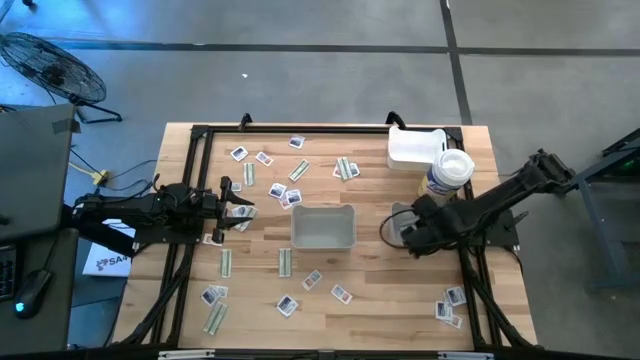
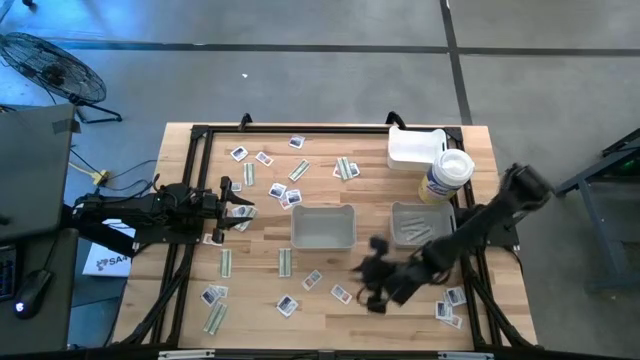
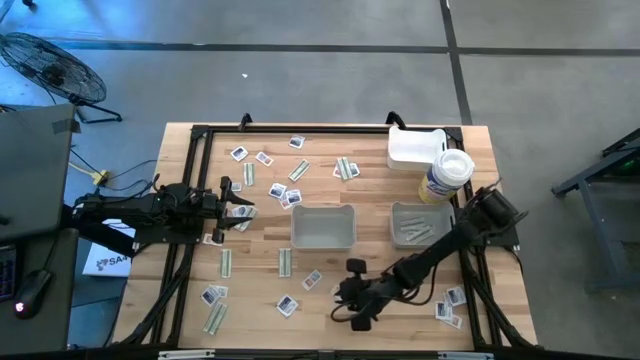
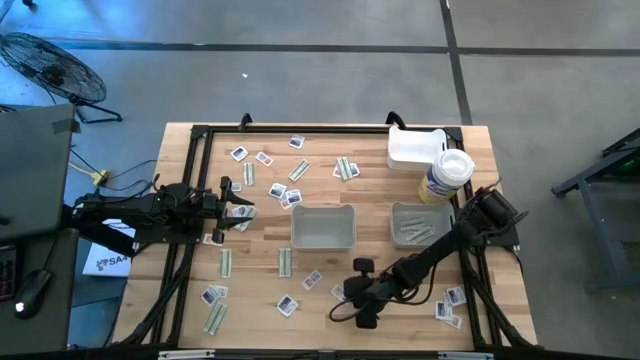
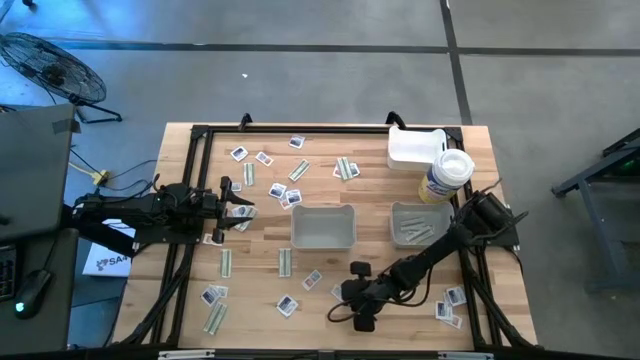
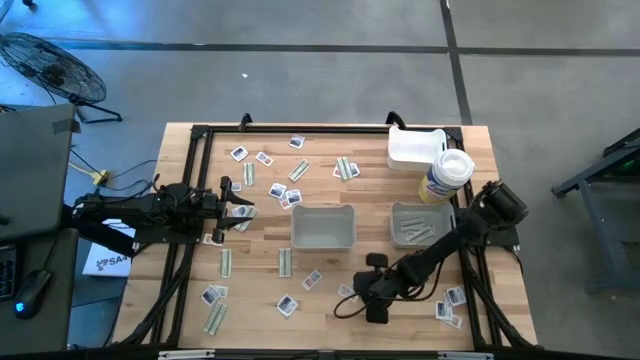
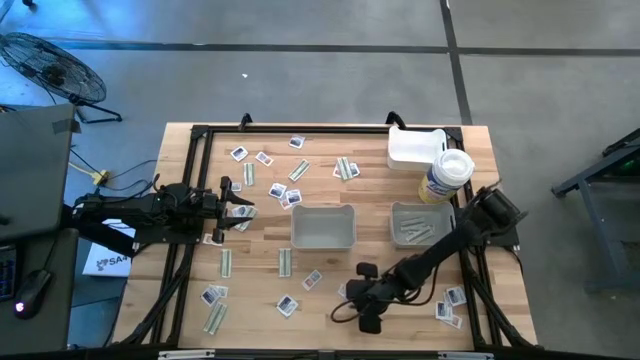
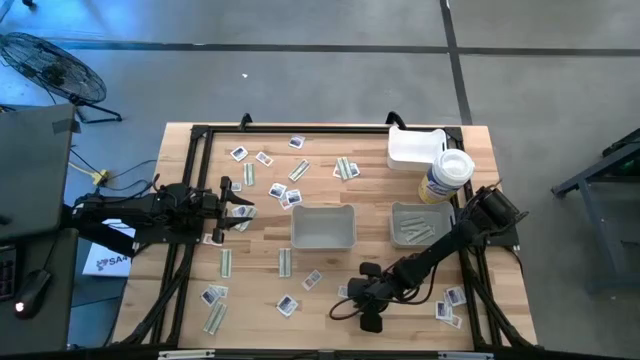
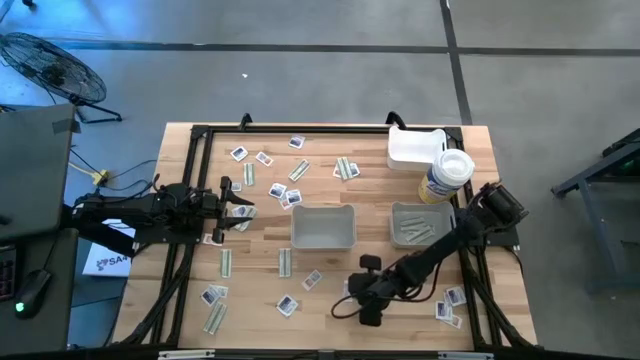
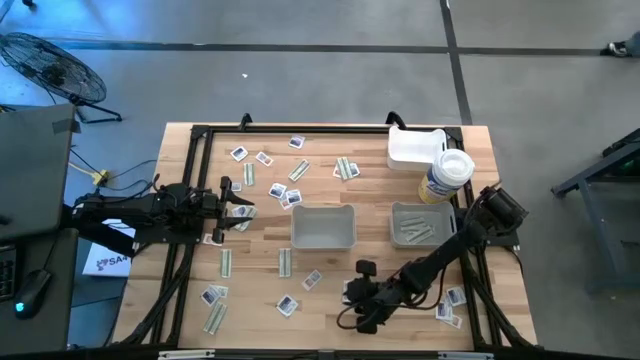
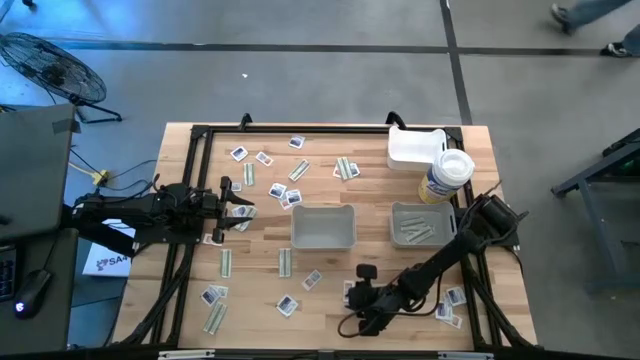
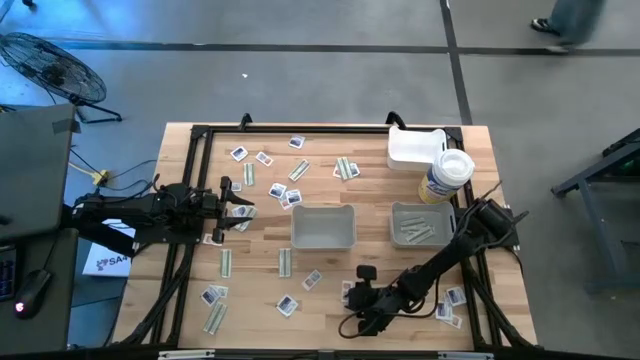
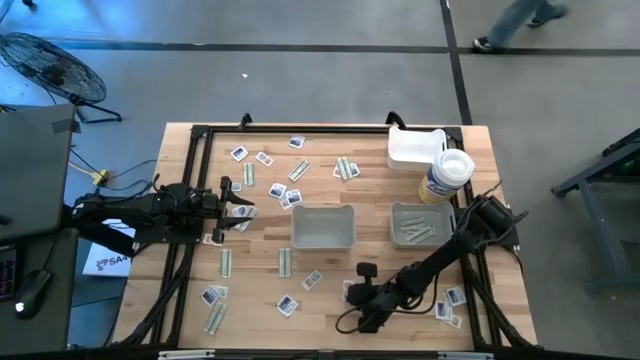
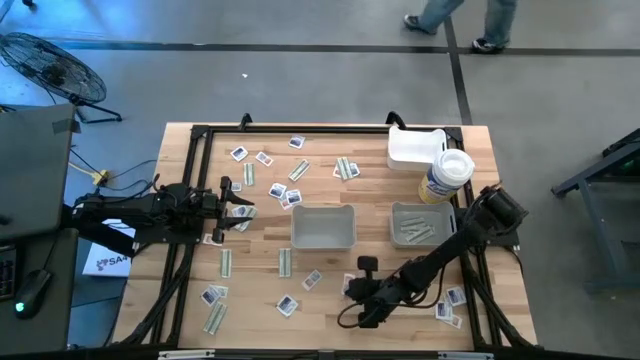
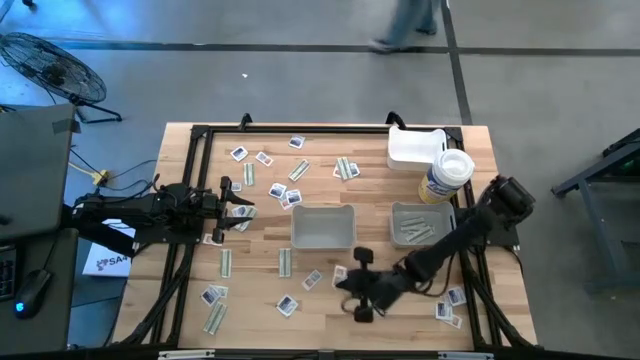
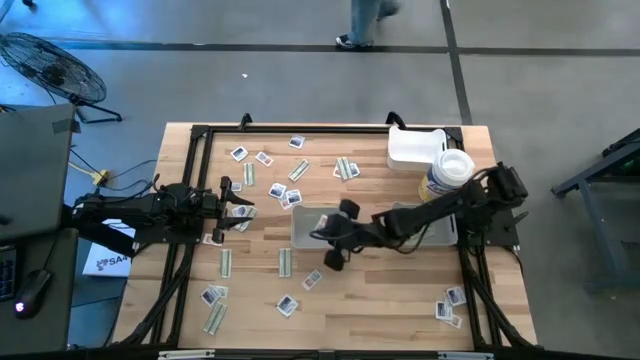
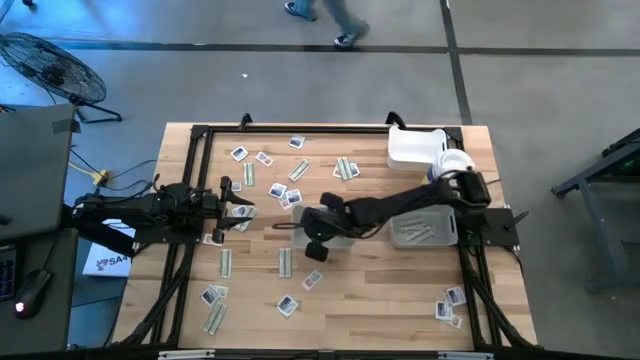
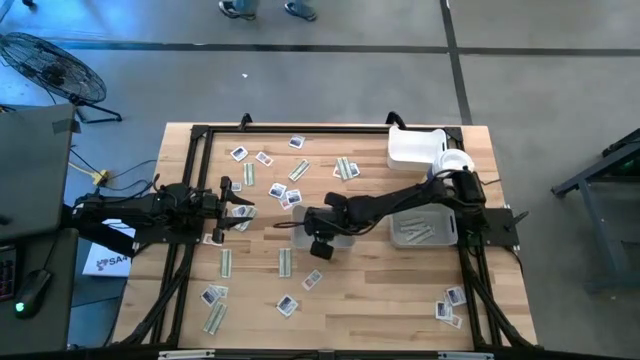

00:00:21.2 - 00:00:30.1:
Task: Pick & Place First Aid Supplies
Put the orange pad into the left gray bin

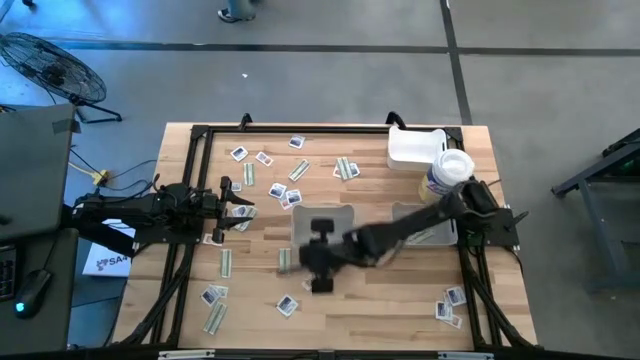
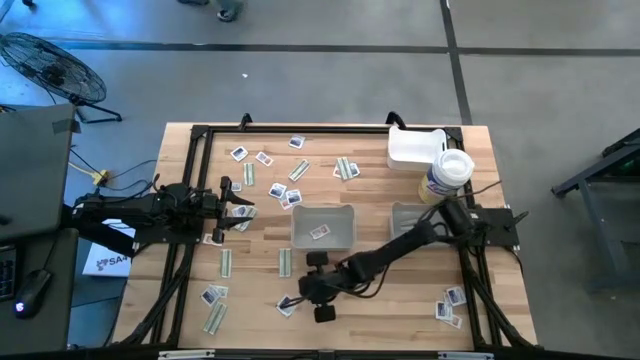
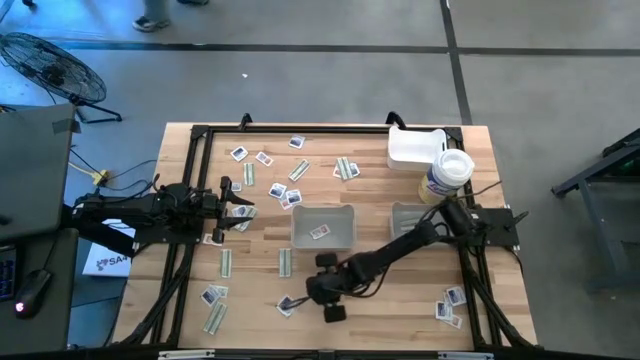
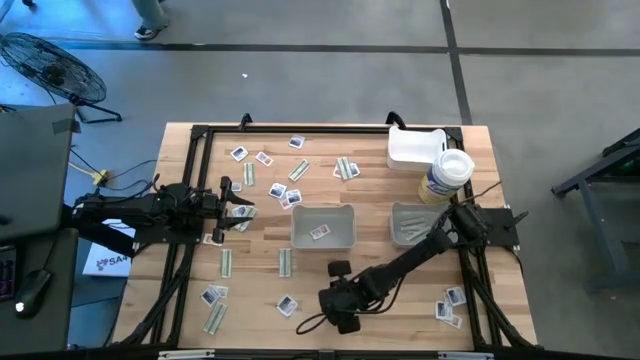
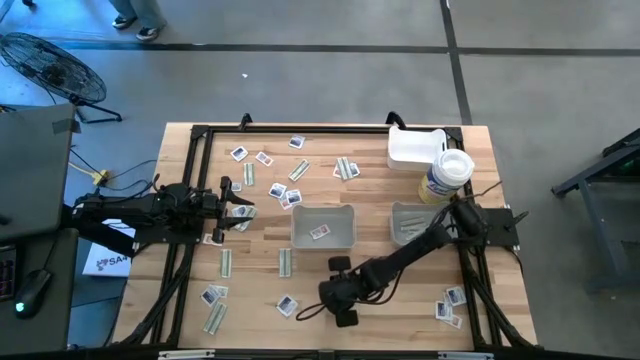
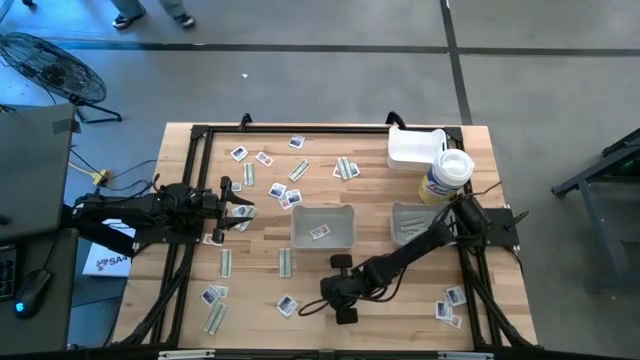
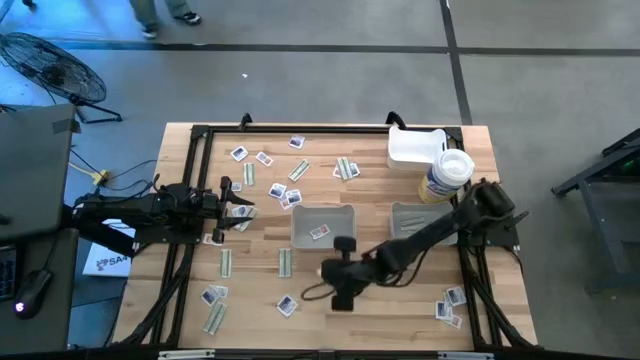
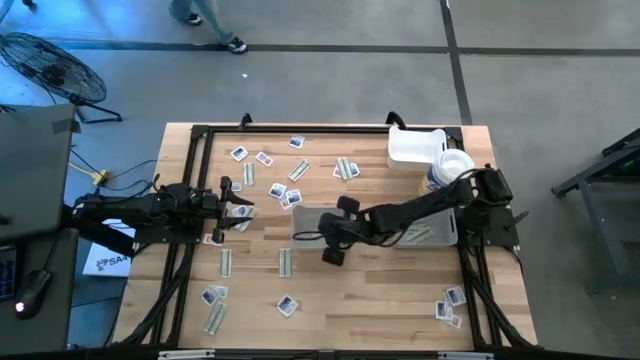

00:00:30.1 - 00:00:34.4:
Put the orange pad into the left gray bin

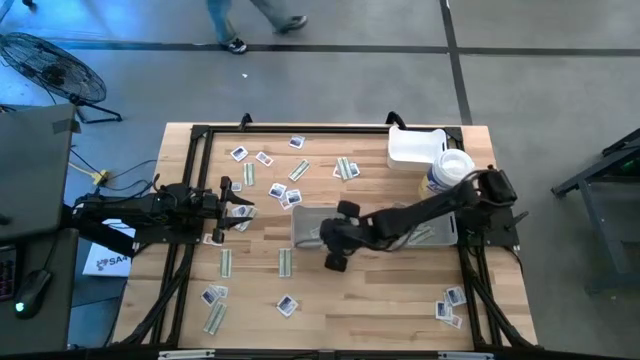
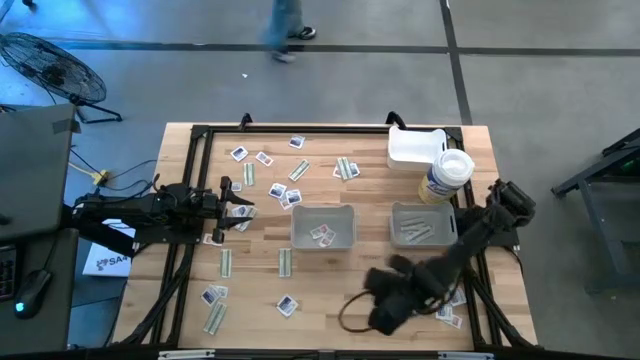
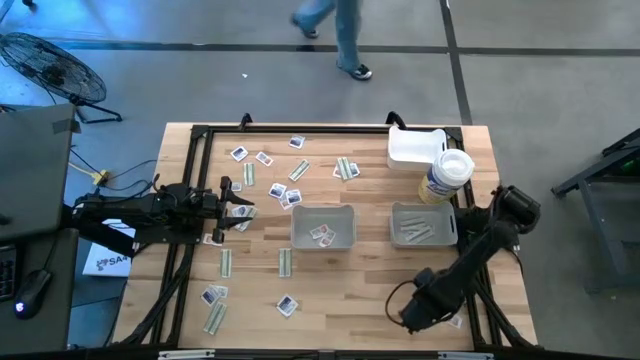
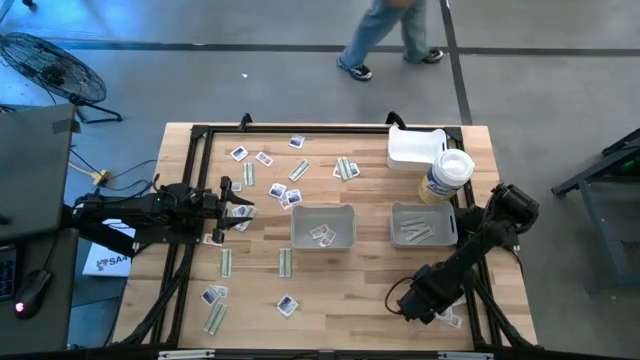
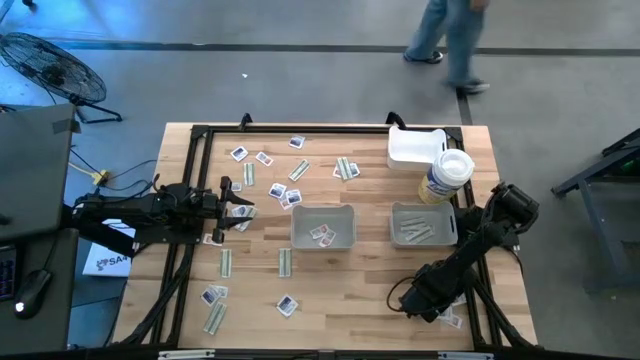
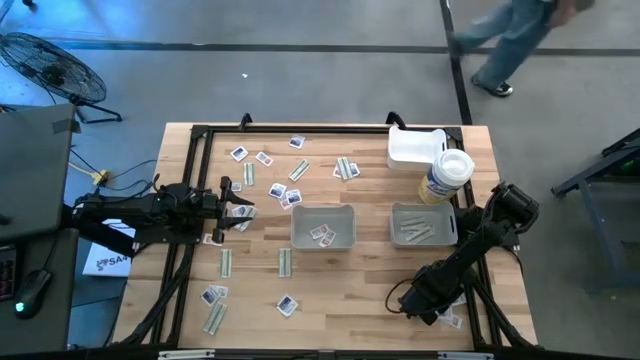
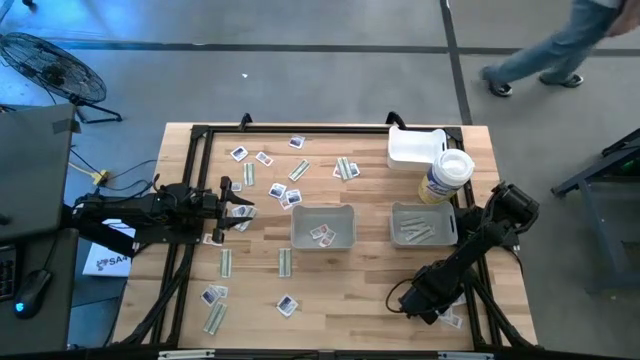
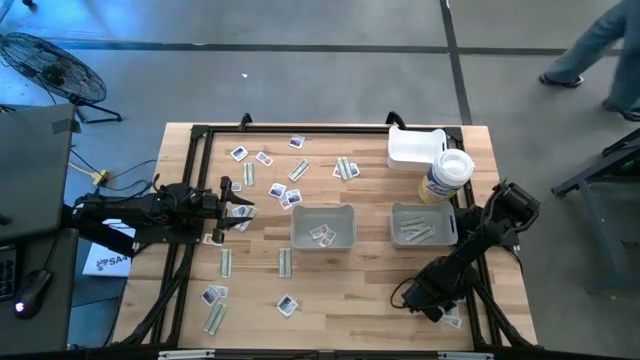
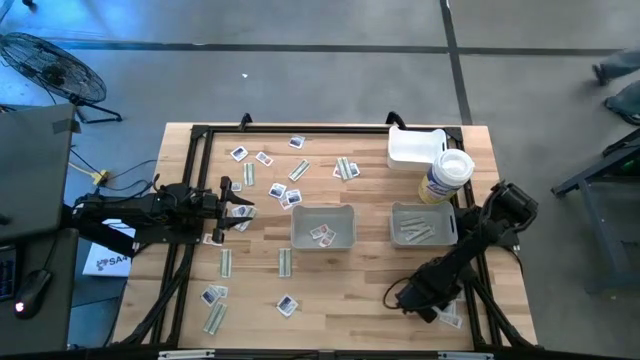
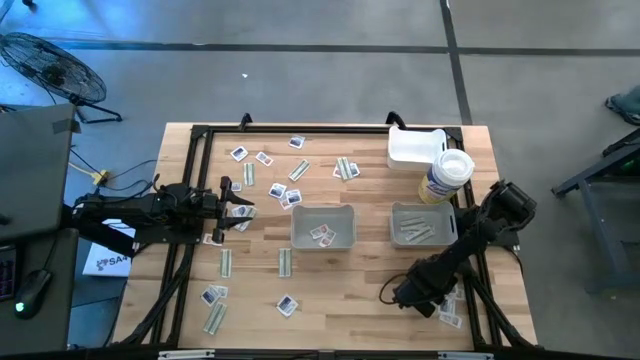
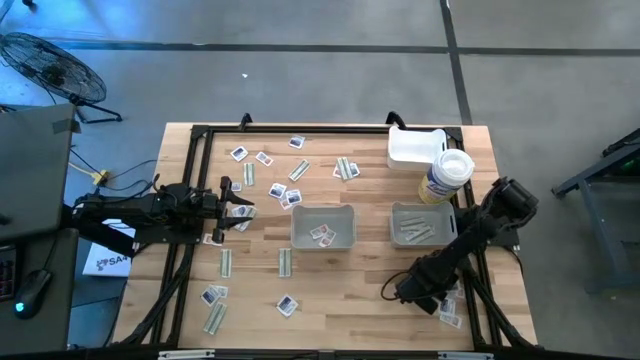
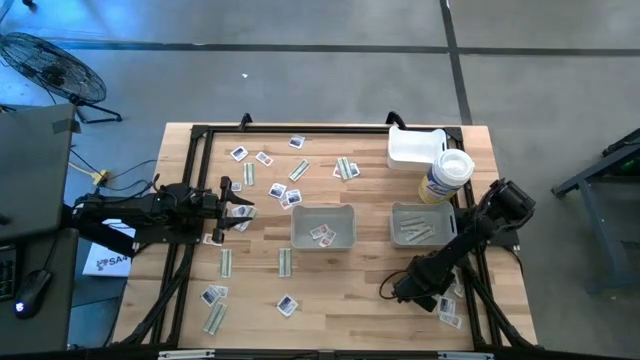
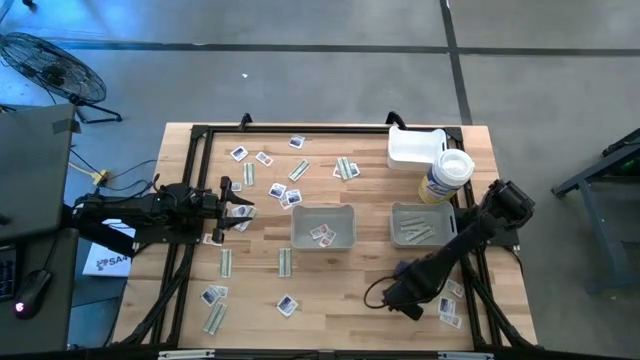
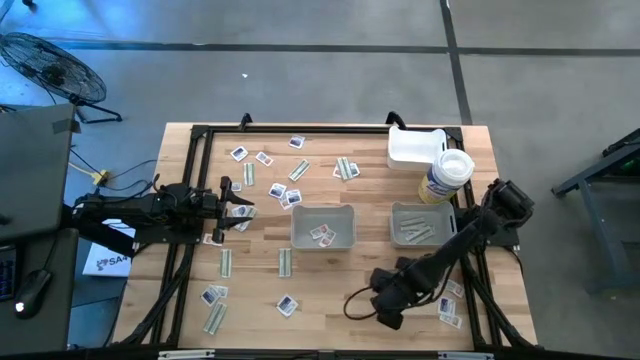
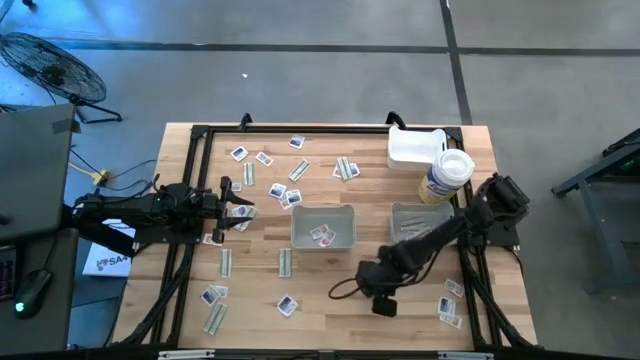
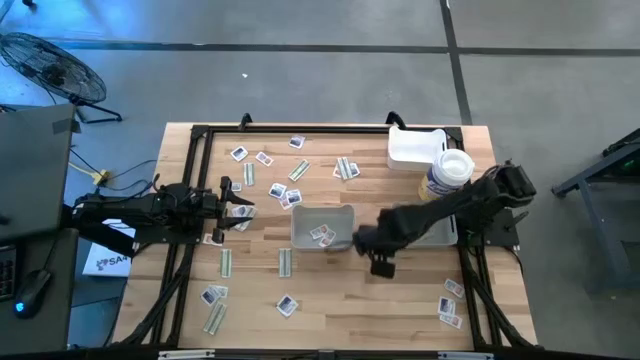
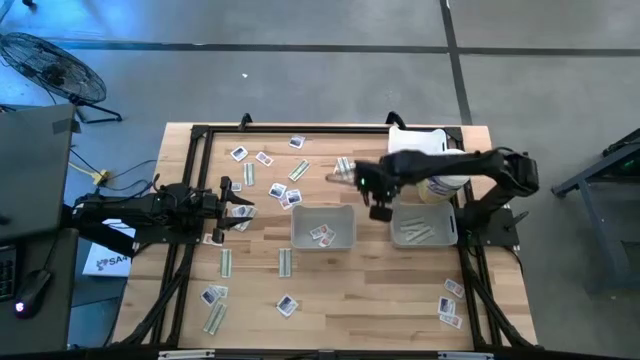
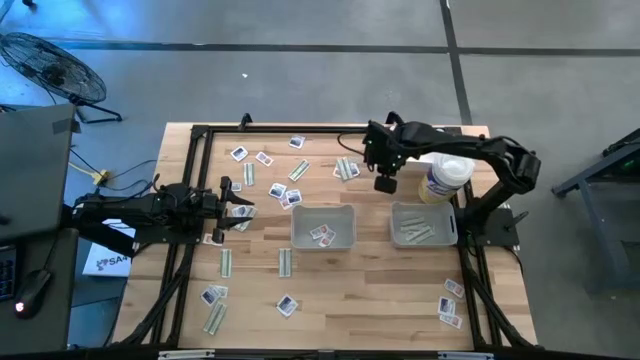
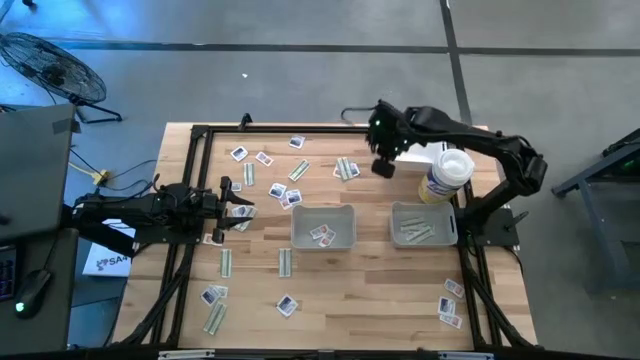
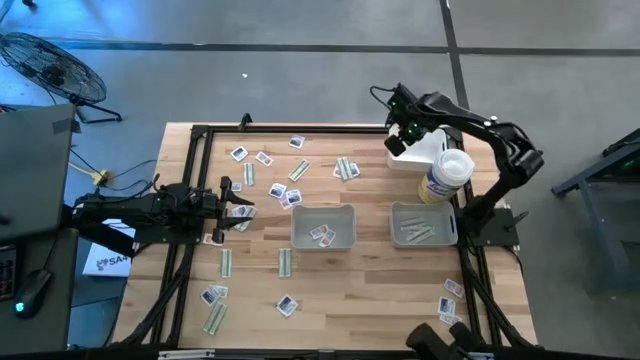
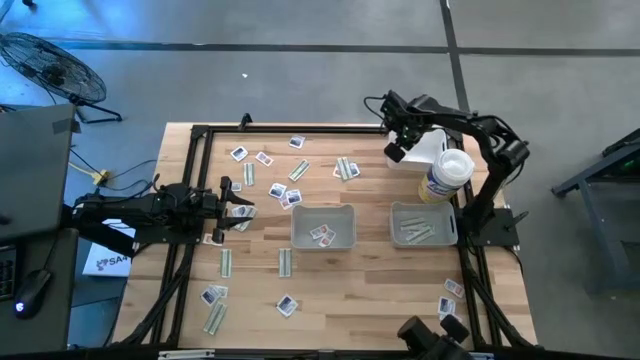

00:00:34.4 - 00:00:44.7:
Put the blue pad into the white bin
